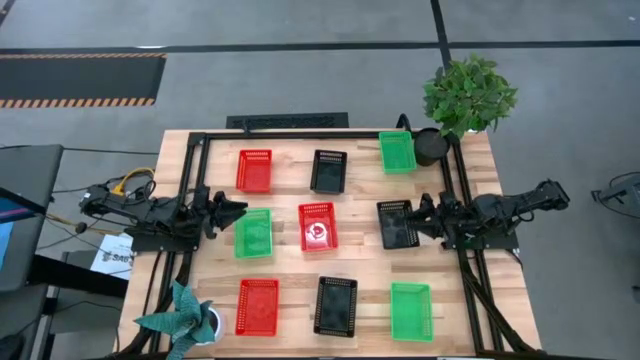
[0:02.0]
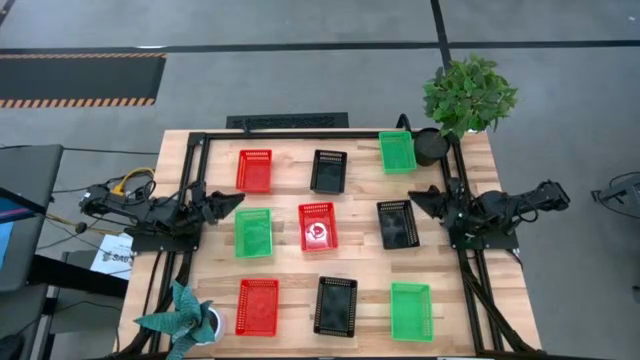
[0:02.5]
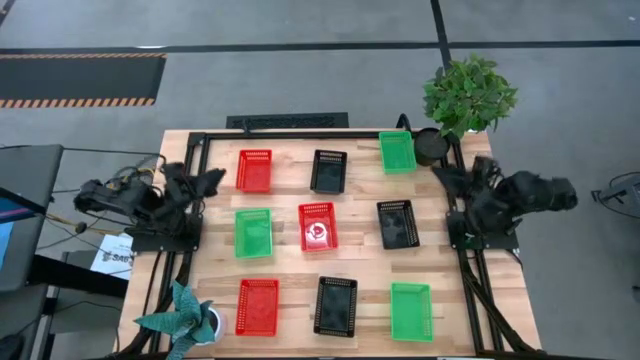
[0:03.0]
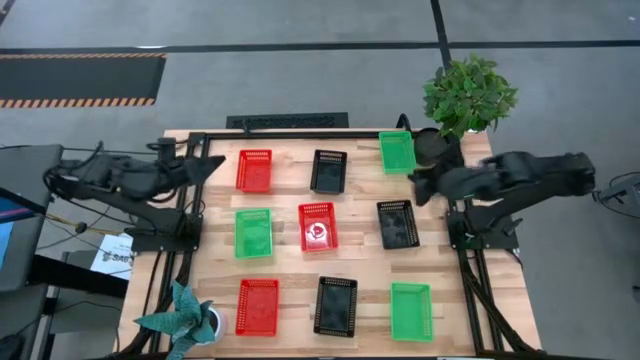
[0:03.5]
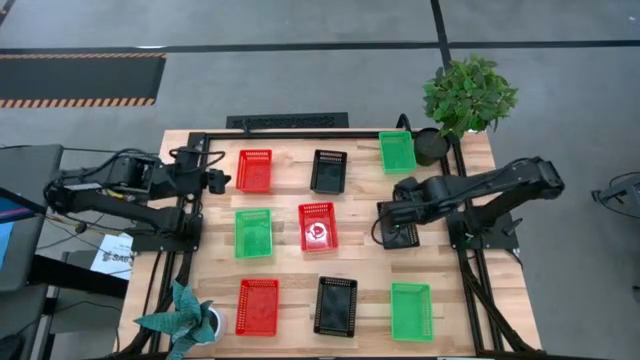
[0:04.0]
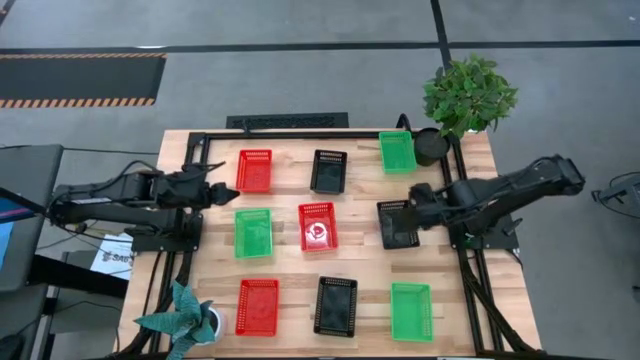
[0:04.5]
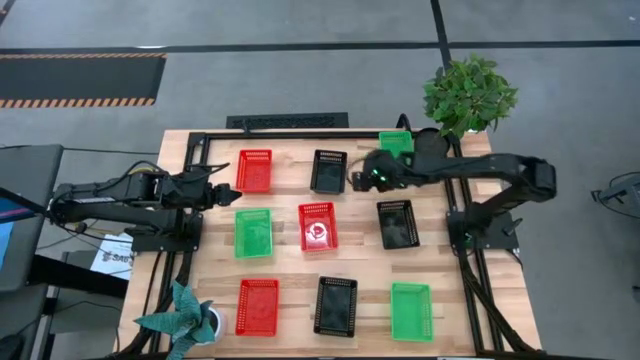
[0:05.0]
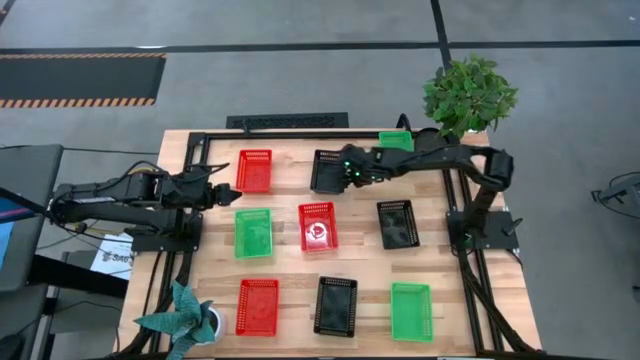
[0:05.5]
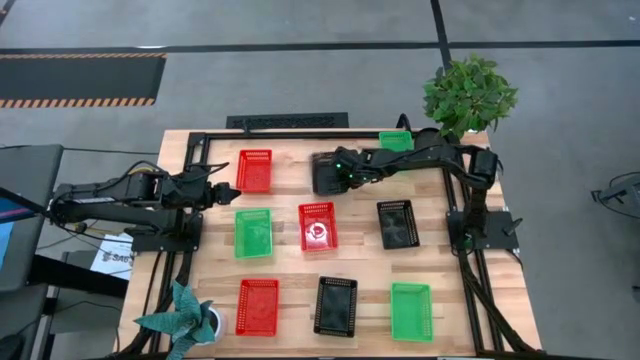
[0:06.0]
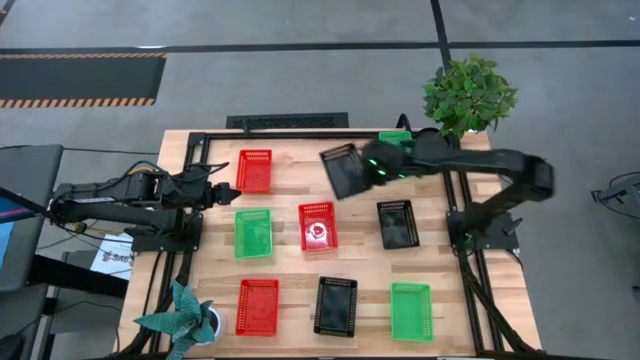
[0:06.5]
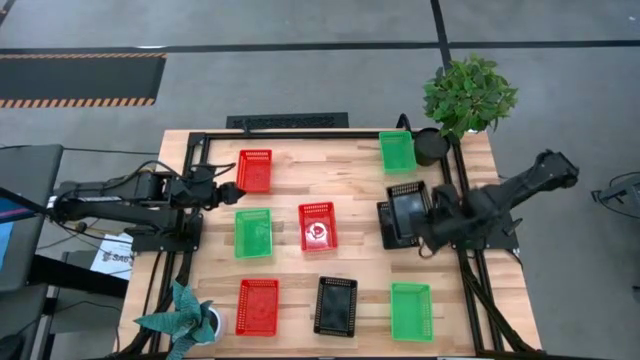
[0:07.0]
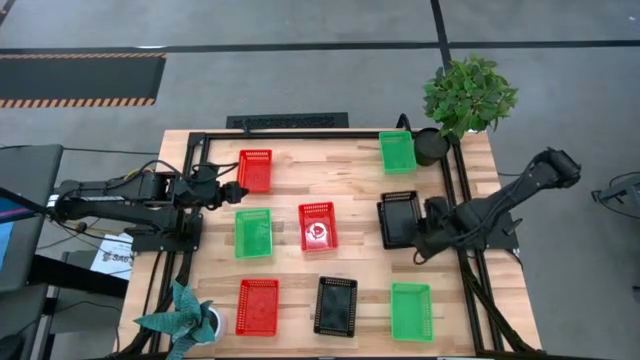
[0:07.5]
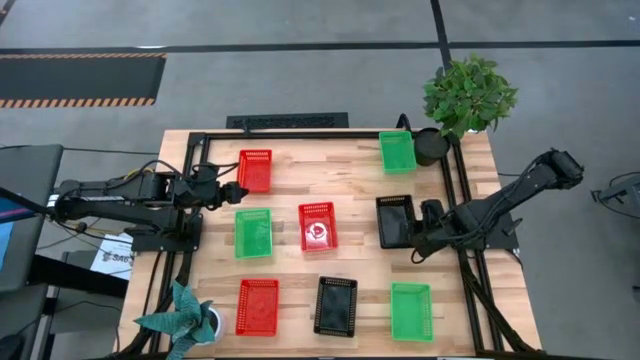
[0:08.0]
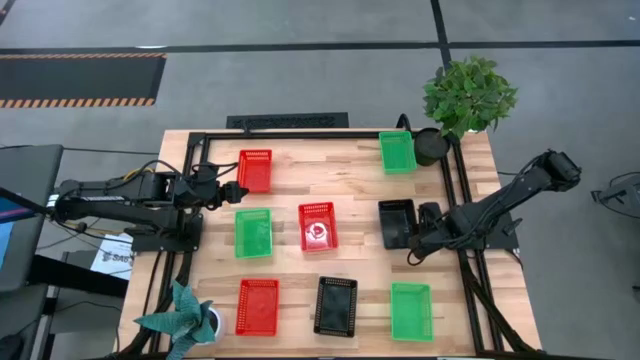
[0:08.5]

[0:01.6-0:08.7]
Stack the top black bin on top of the middle black bin

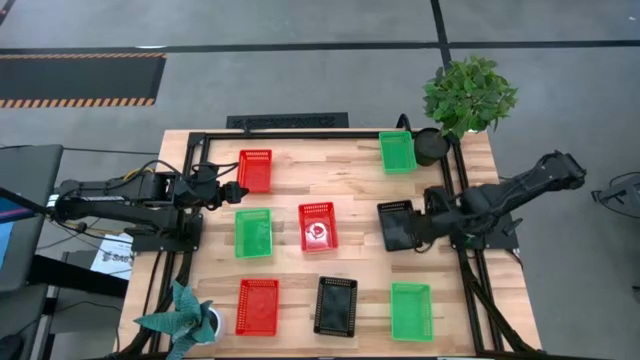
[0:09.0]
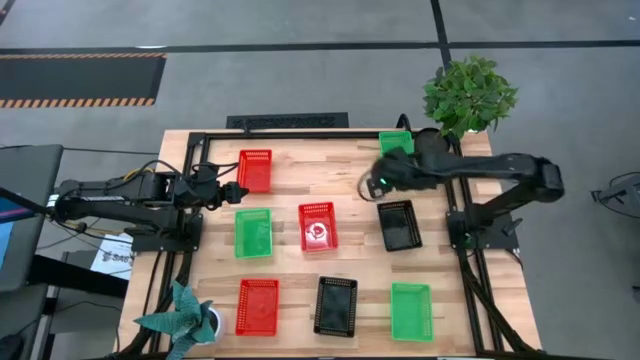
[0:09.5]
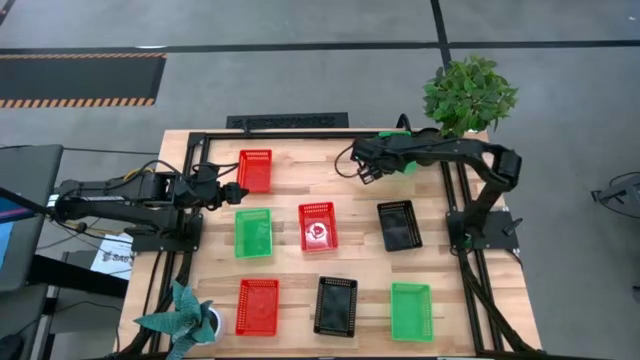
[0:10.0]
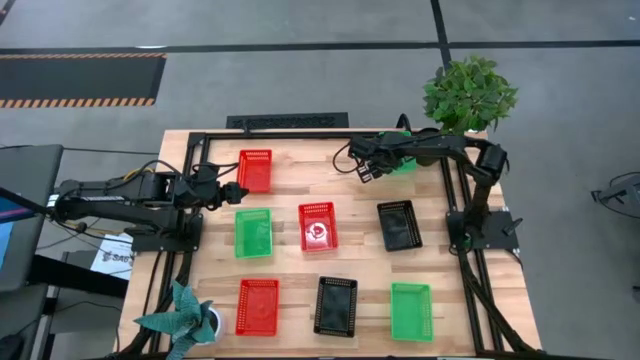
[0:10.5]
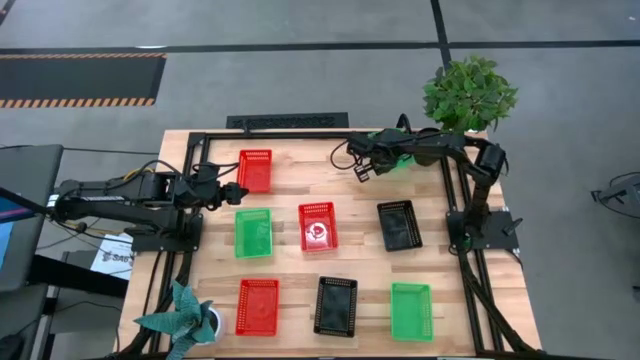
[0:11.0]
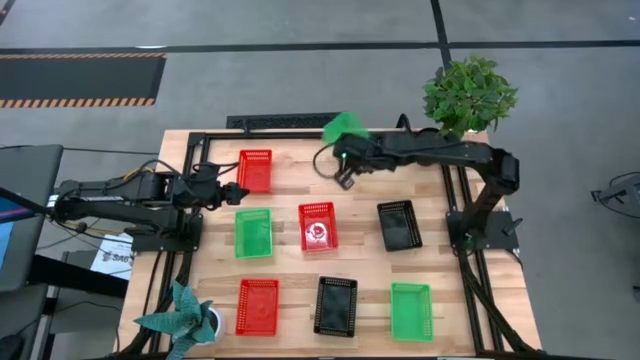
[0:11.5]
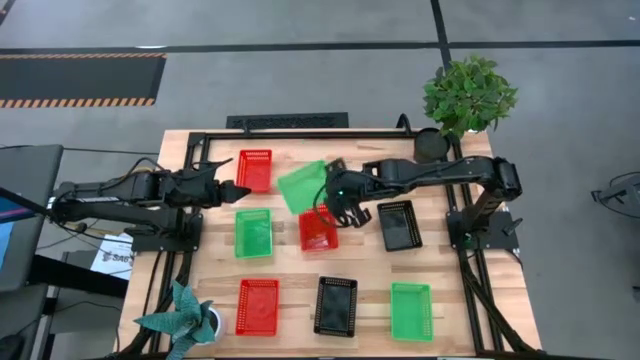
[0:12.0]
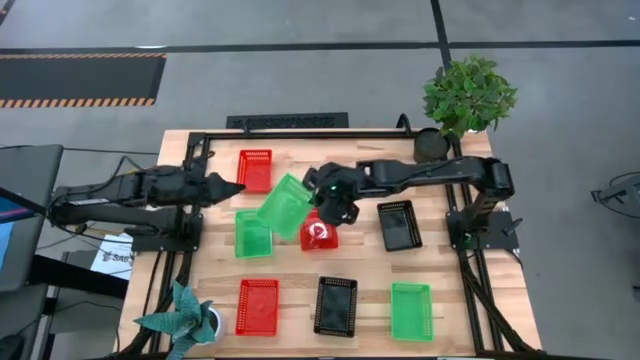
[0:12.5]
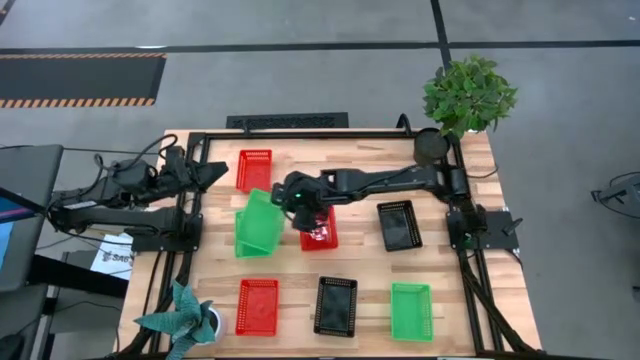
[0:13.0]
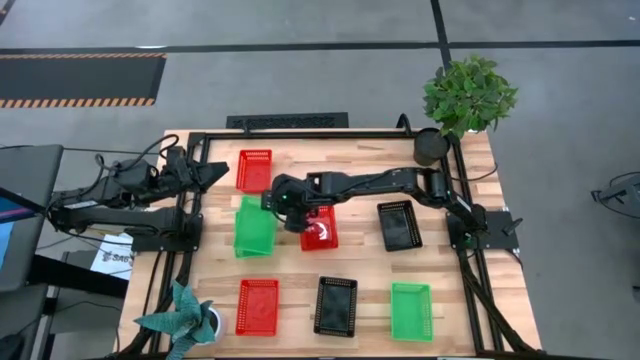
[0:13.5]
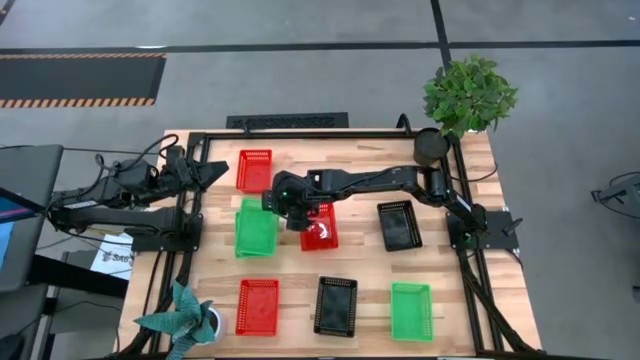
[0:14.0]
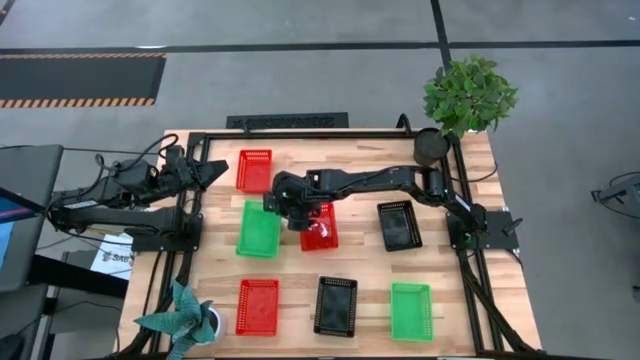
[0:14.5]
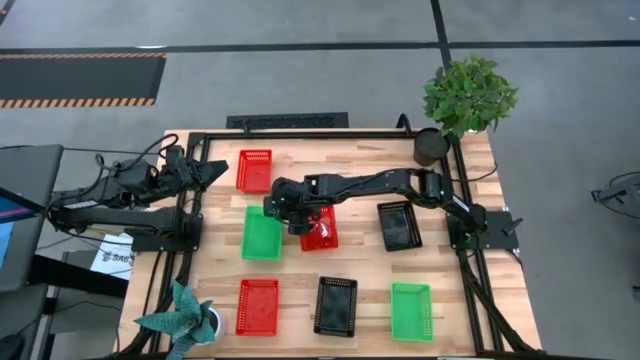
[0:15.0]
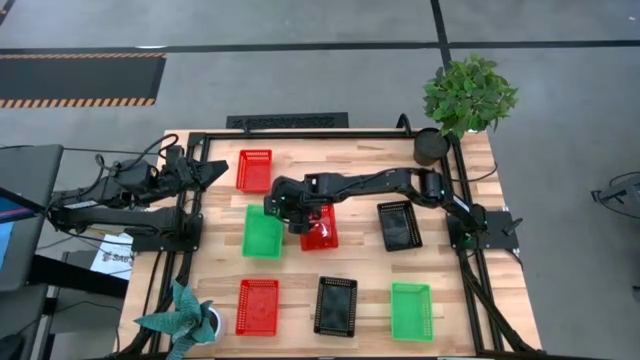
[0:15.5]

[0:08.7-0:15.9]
Stack the top green bin on top of the middle green bin
